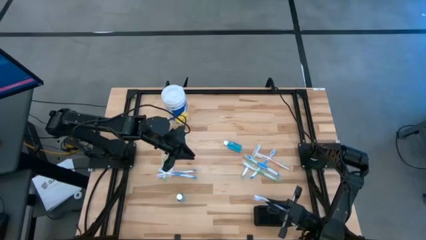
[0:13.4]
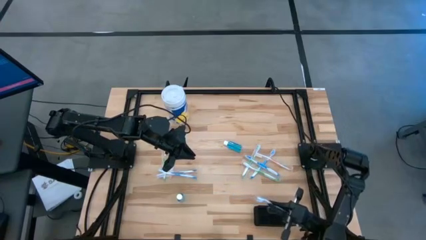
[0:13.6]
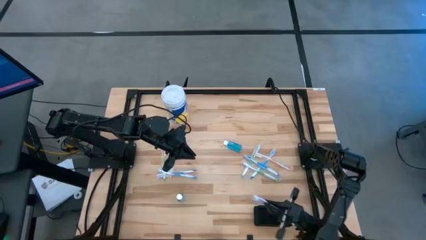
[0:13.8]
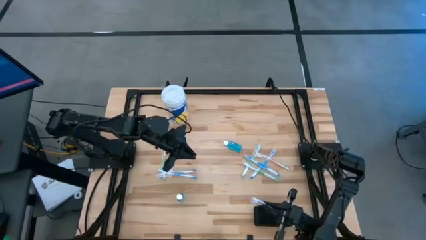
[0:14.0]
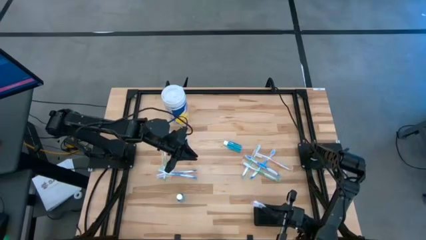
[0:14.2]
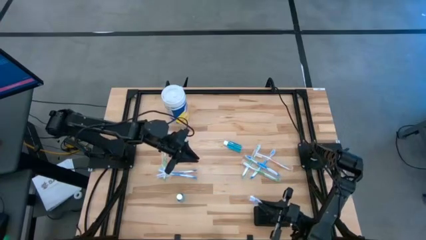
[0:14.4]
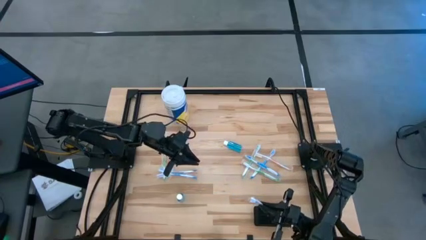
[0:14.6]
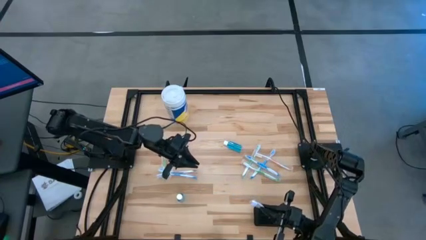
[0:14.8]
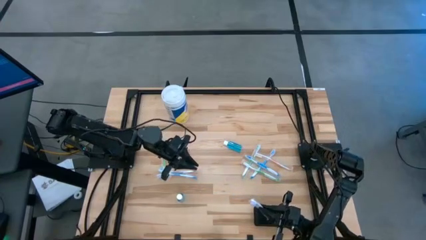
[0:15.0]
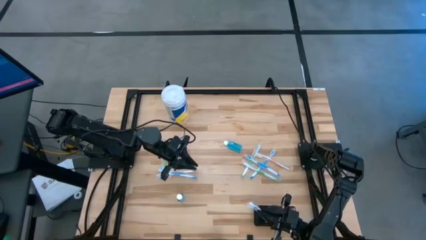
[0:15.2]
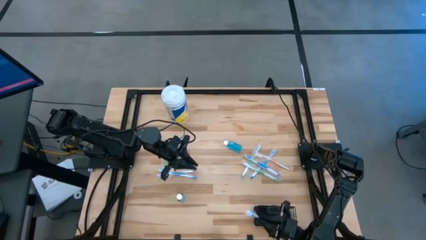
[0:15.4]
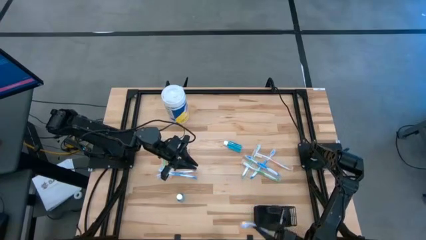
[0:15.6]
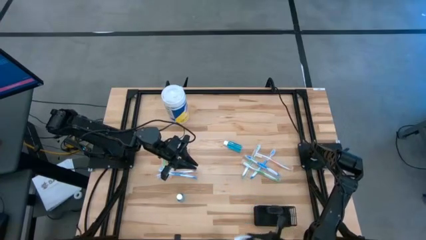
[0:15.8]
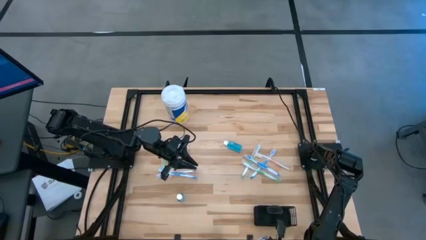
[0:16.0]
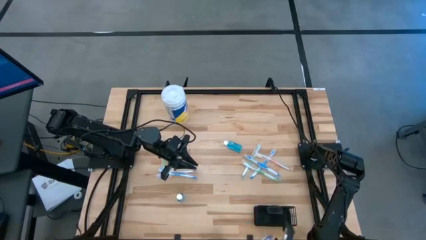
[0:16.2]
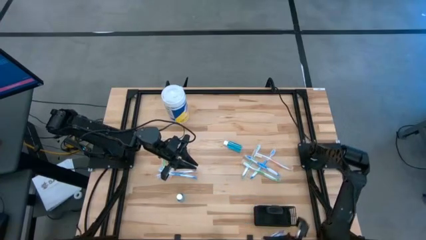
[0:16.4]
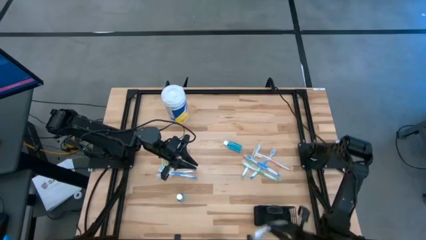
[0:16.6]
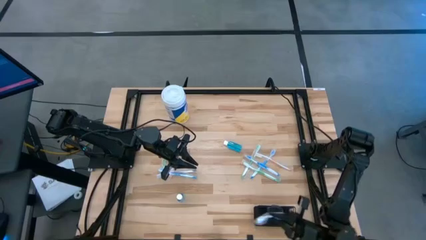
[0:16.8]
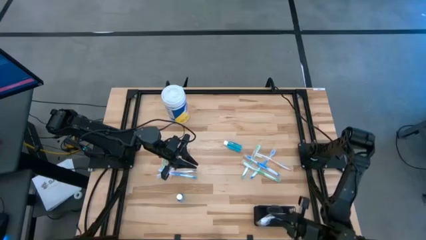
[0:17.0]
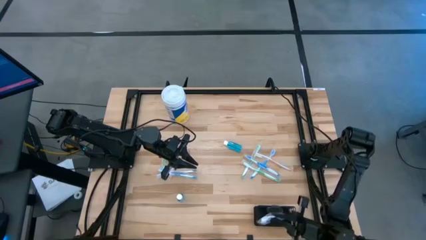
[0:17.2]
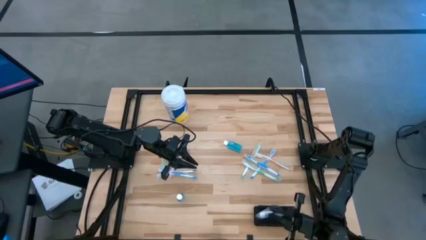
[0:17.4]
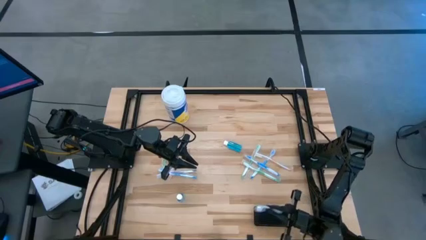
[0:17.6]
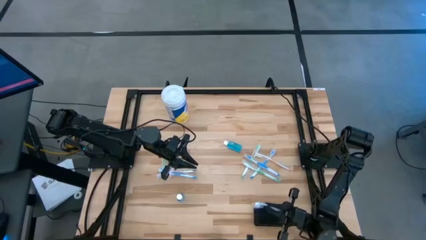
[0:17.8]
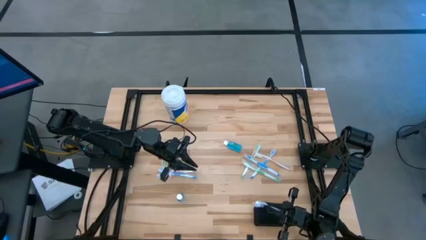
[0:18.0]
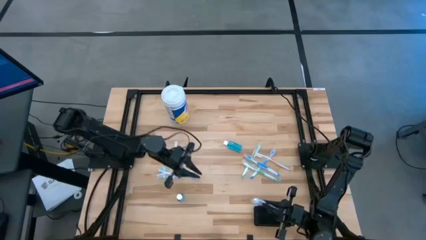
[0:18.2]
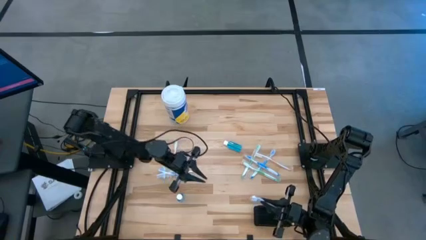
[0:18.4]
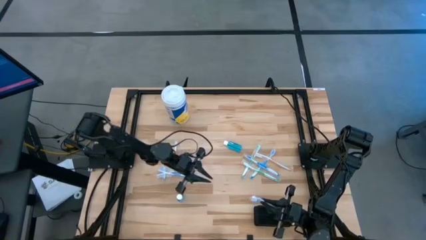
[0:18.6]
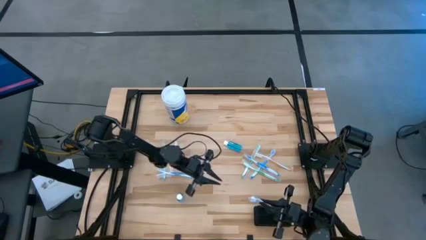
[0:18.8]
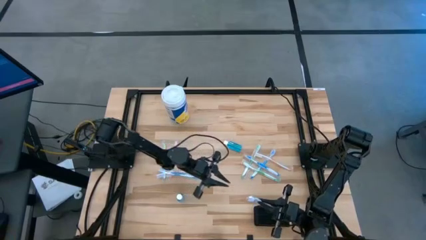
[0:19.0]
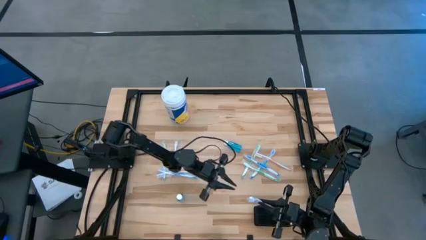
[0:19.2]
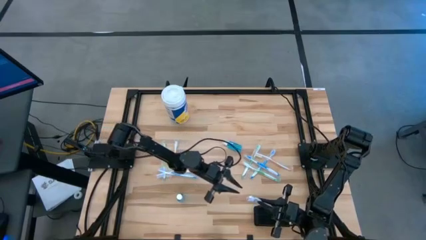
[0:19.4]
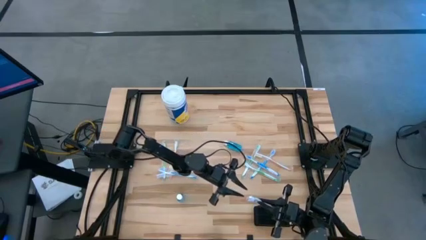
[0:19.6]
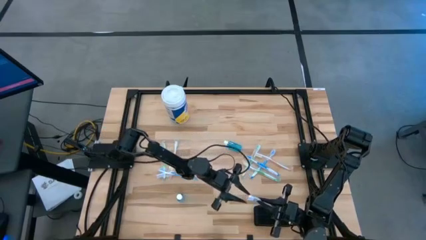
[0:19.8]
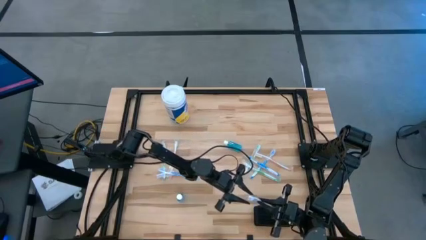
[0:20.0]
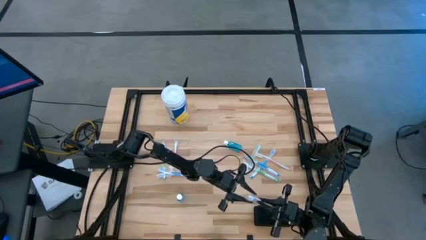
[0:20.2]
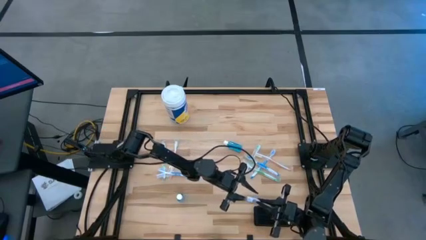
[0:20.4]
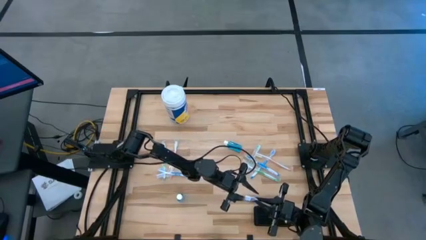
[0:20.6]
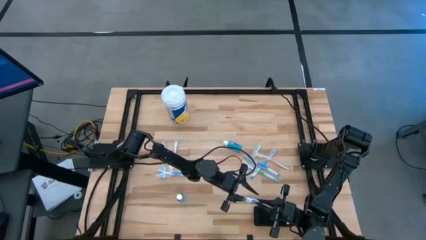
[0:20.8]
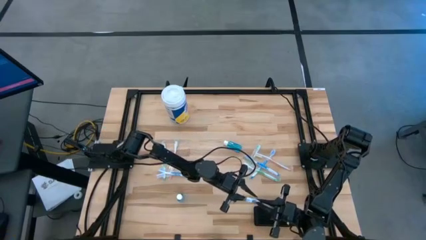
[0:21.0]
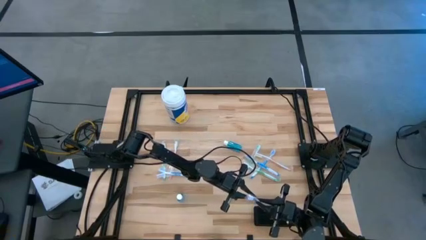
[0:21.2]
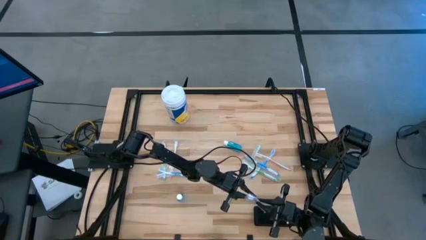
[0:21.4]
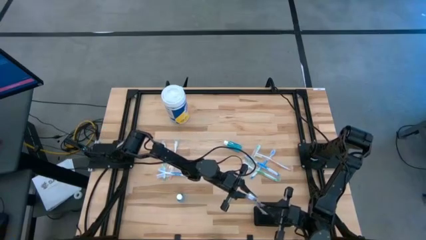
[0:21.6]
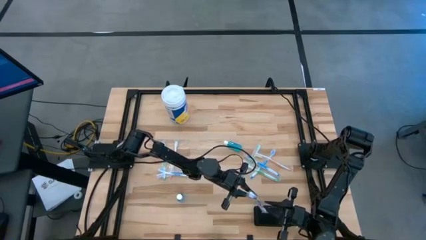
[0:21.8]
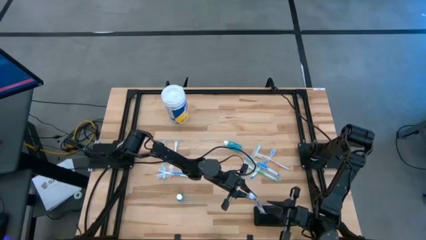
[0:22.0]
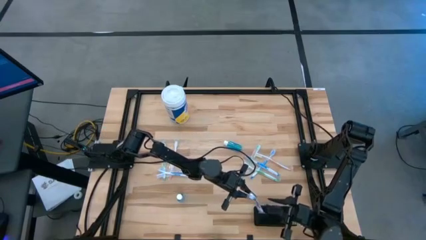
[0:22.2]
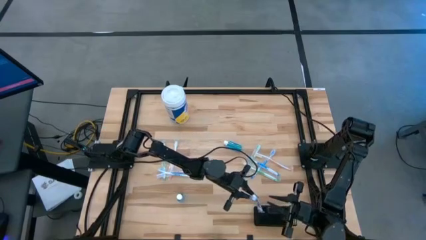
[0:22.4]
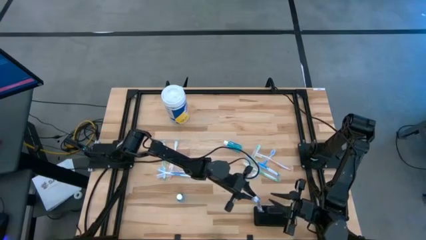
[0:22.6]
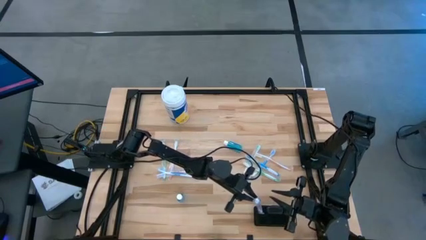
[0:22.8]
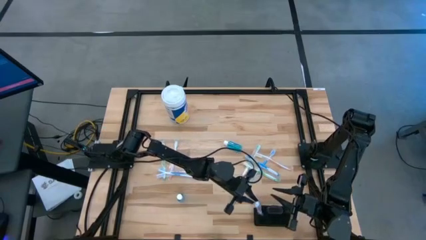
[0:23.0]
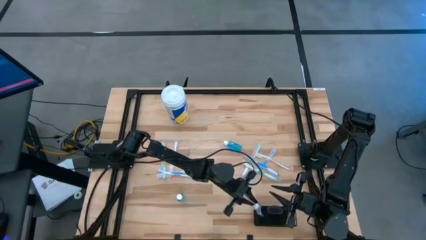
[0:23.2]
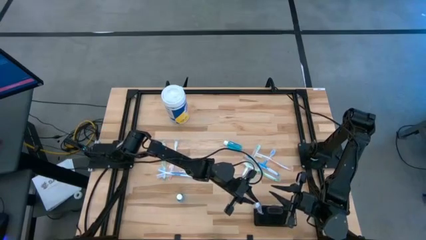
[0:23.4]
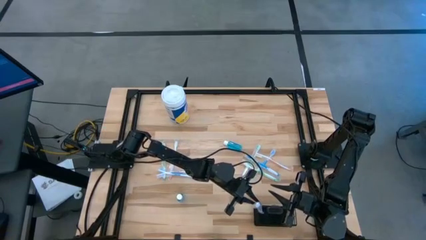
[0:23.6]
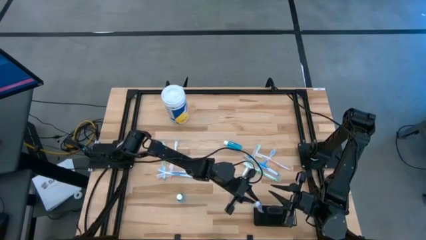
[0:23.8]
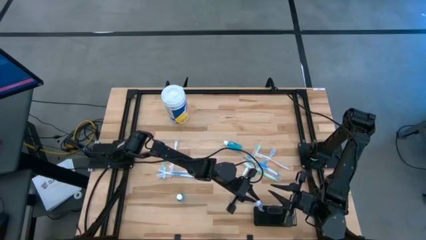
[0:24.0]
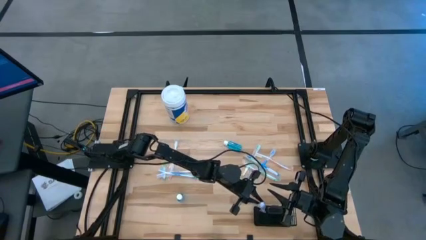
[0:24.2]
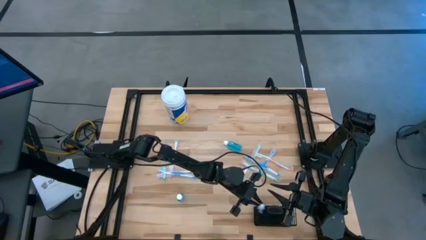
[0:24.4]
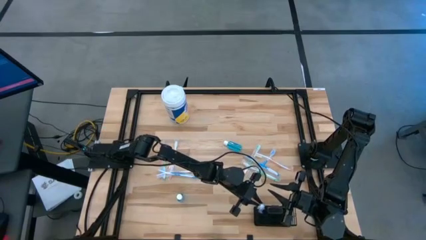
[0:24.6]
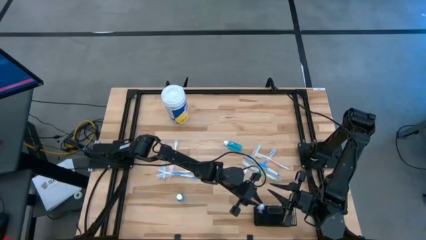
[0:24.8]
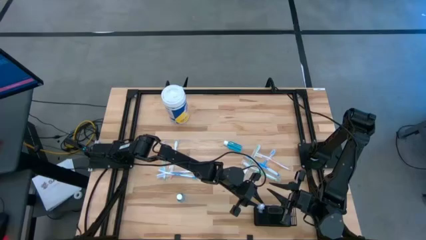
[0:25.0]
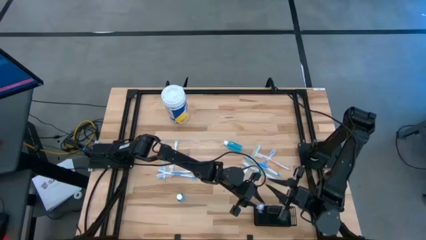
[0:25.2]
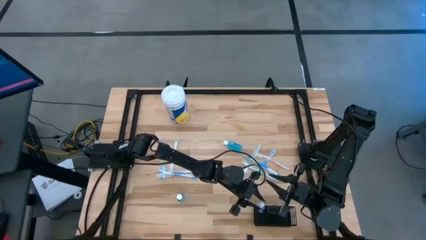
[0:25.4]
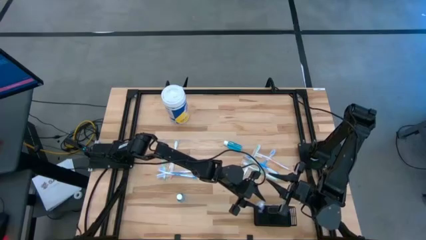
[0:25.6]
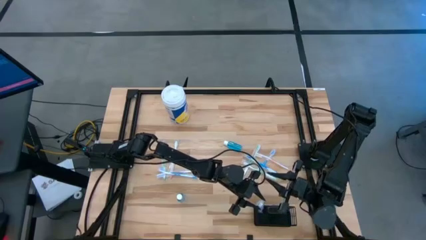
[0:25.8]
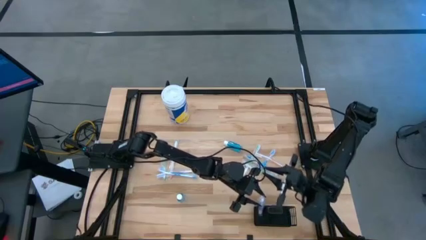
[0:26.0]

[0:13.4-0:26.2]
Task: Pick & Place toothbrushing station
Put the top left violet toothbrush into the wire organizer

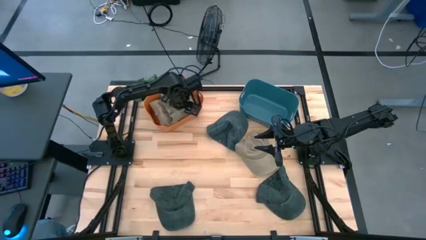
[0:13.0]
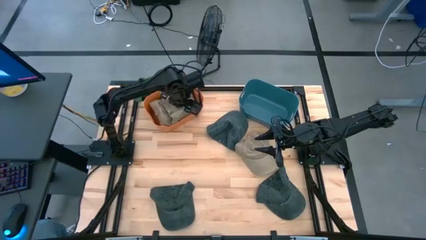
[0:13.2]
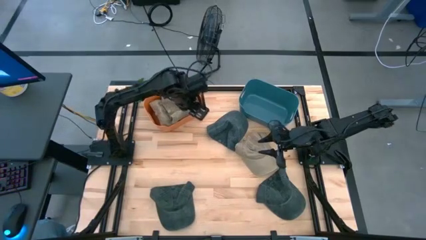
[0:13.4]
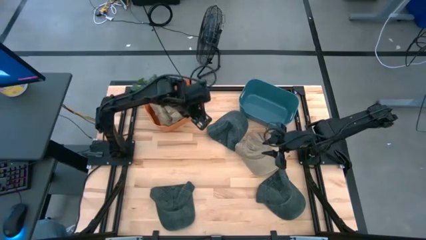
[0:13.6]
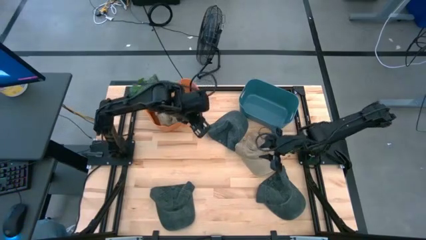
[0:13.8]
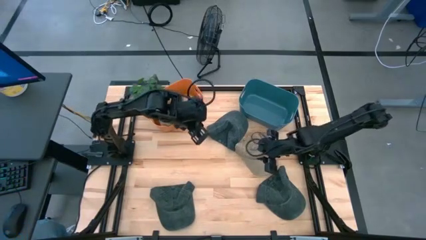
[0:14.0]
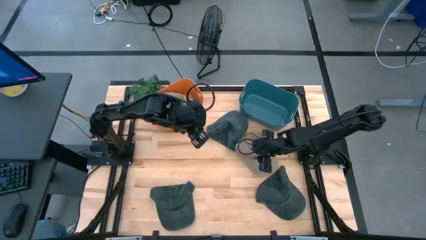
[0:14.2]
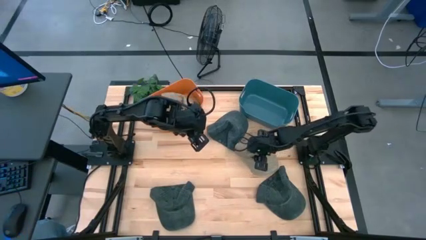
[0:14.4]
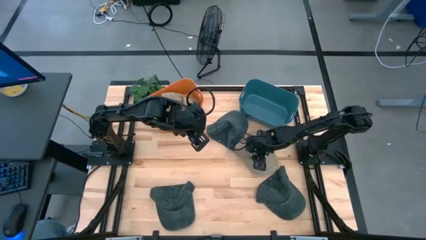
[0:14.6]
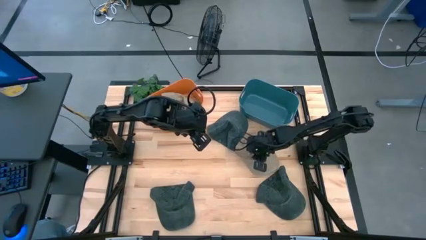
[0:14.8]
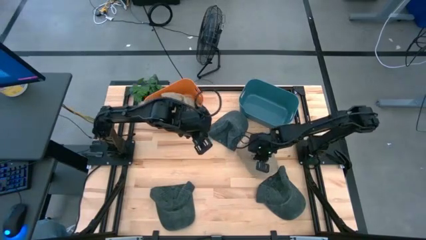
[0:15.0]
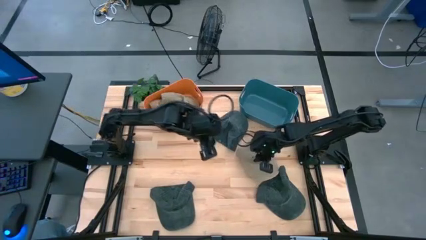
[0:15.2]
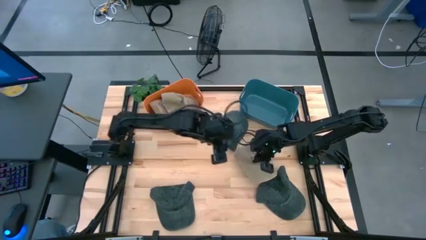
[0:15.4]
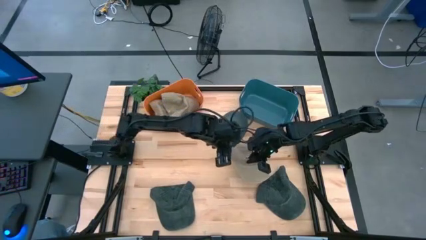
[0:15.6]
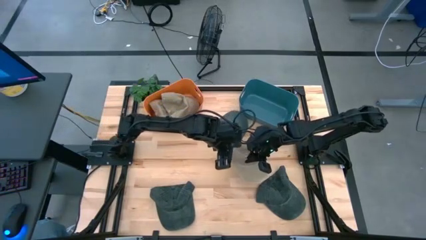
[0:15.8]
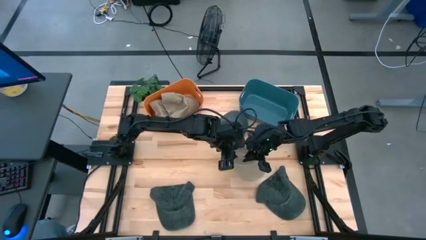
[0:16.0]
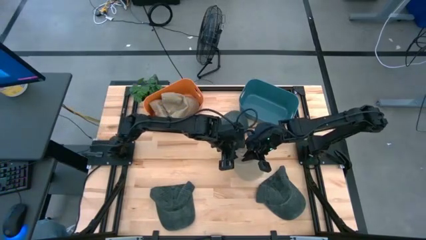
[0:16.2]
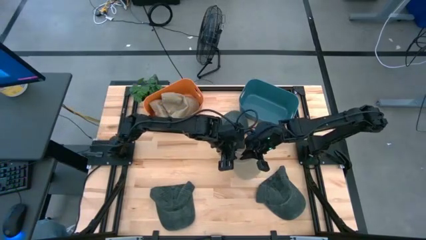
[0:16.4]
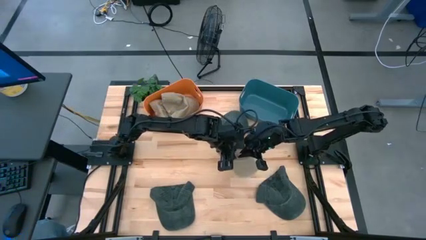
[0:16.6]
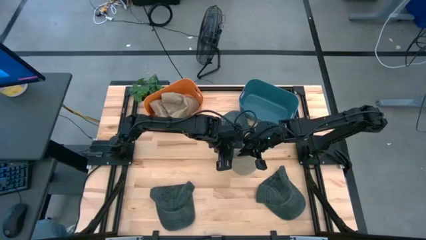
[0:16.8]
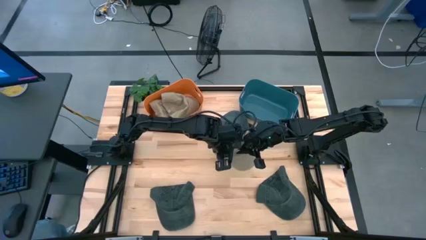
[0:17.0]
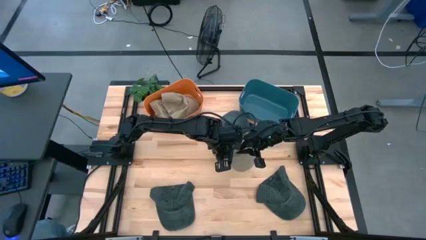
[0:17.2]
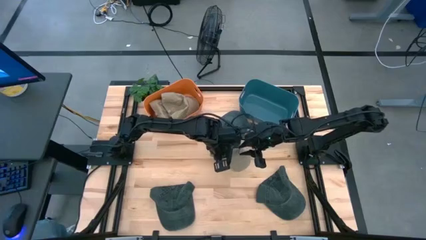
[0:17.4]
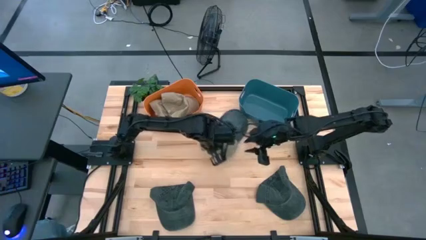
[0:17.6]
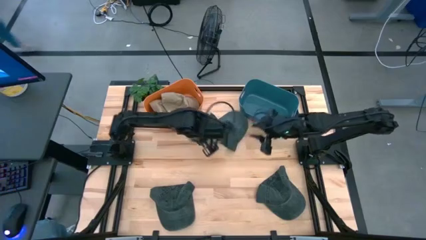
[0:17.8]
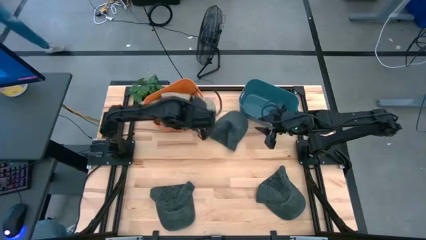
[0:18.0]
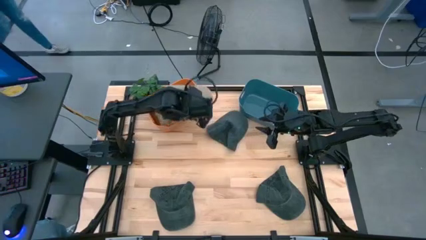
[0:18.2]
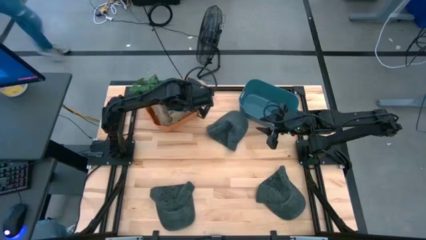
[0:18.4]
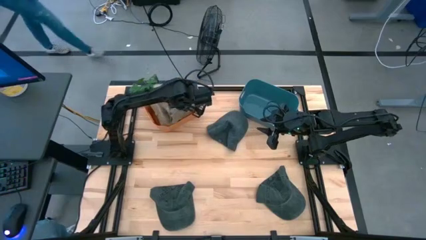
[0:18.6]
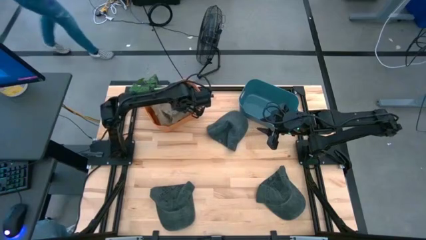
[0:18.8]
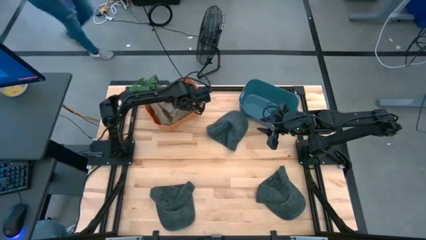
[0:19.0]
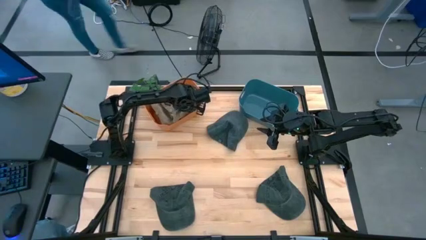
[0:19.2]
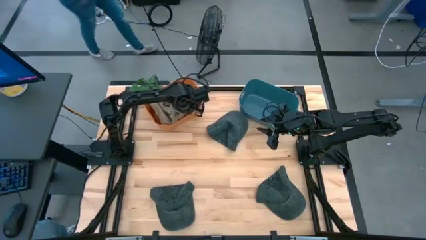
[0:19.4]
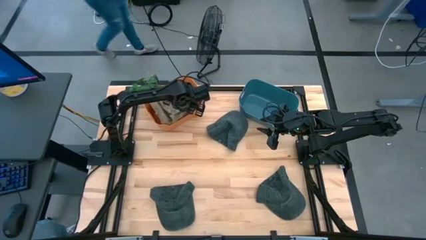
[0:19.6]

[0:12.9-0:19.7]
Task: Pick & Place hat
Put the brown cap into the orange bin
